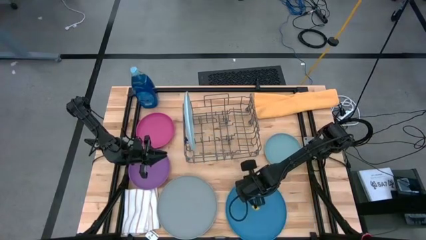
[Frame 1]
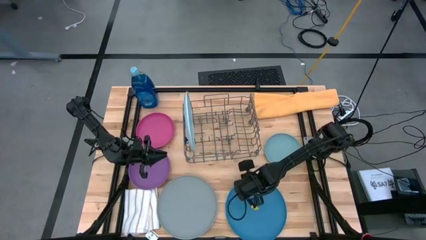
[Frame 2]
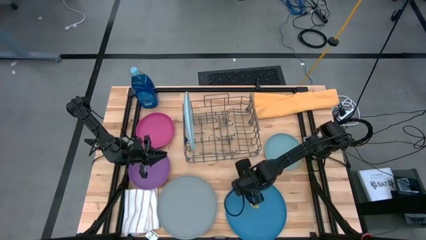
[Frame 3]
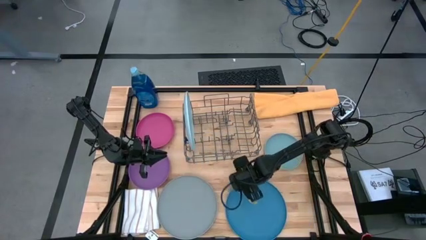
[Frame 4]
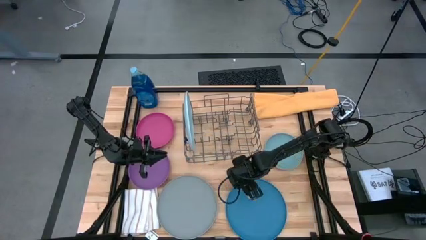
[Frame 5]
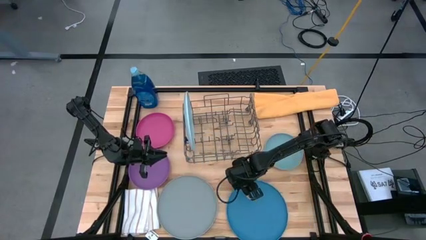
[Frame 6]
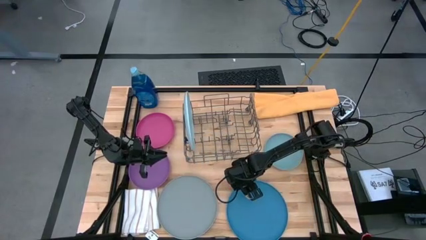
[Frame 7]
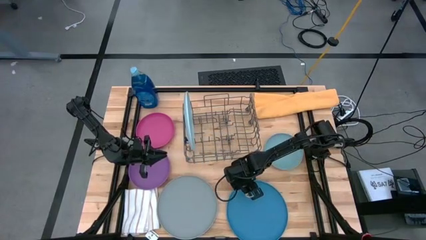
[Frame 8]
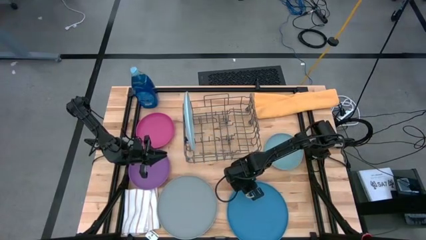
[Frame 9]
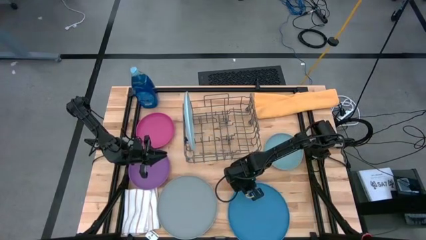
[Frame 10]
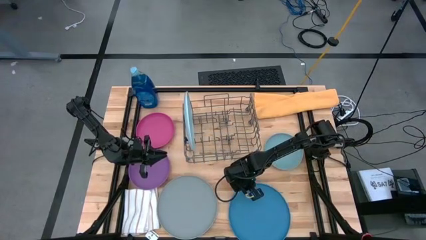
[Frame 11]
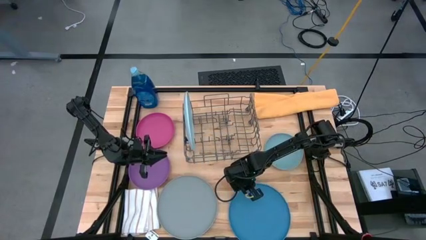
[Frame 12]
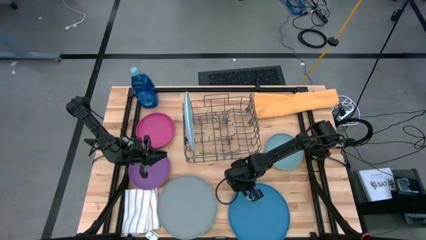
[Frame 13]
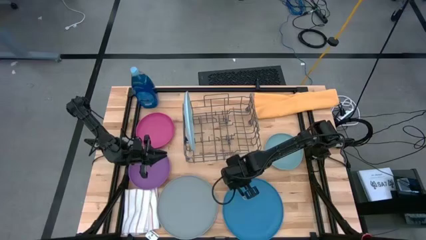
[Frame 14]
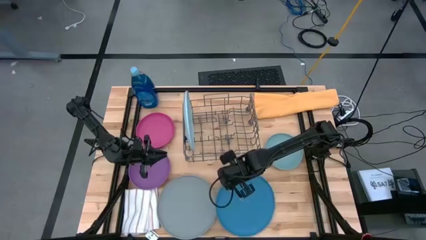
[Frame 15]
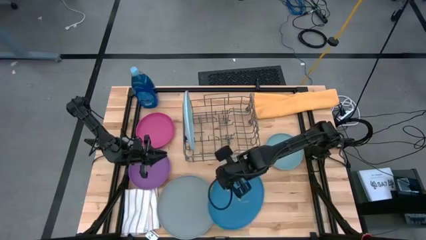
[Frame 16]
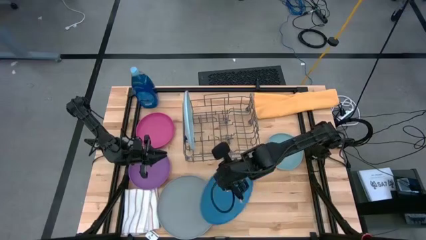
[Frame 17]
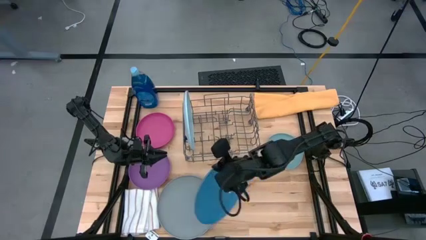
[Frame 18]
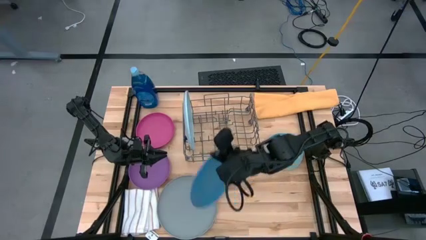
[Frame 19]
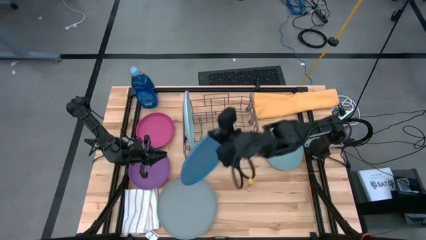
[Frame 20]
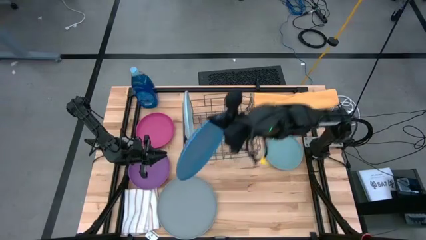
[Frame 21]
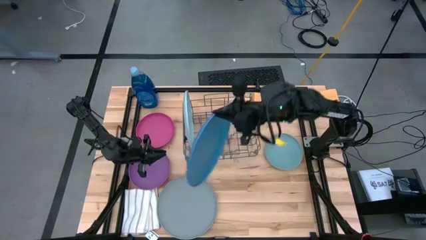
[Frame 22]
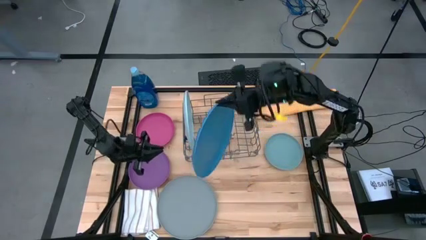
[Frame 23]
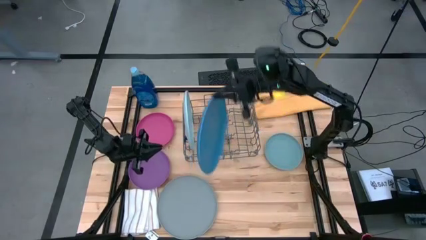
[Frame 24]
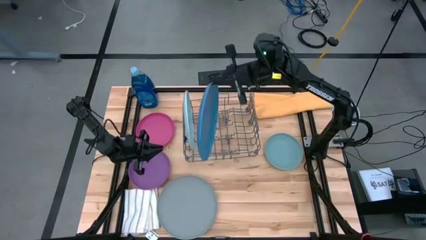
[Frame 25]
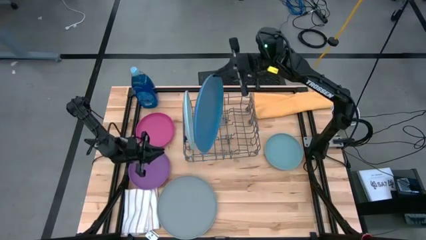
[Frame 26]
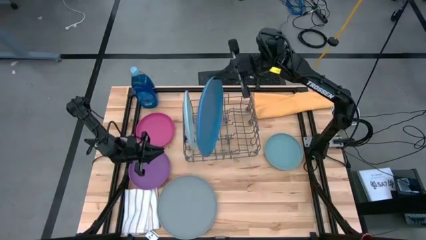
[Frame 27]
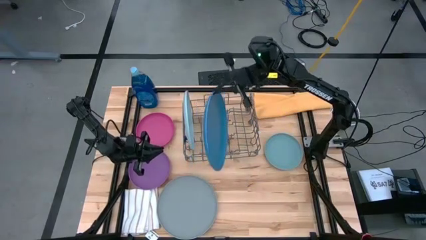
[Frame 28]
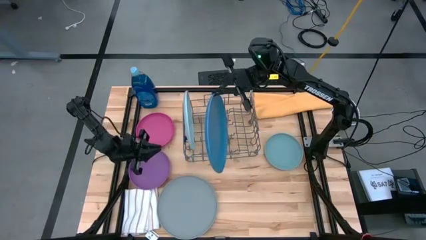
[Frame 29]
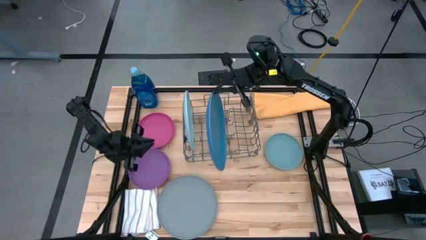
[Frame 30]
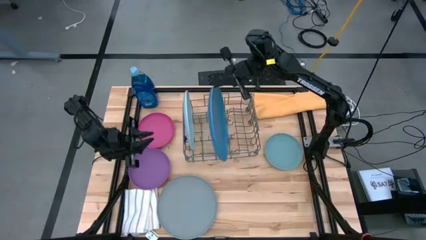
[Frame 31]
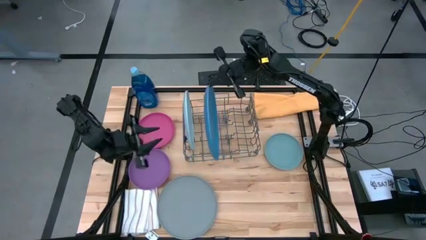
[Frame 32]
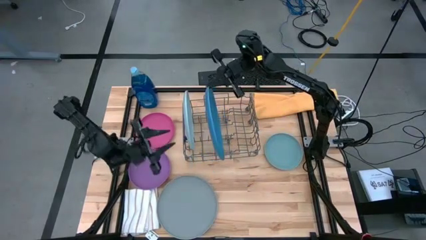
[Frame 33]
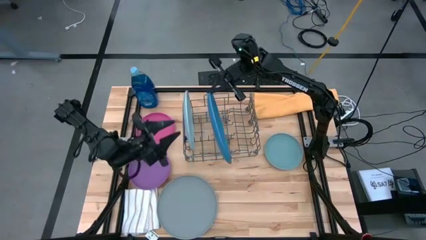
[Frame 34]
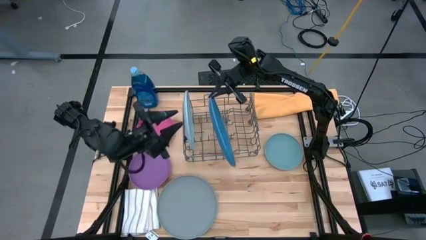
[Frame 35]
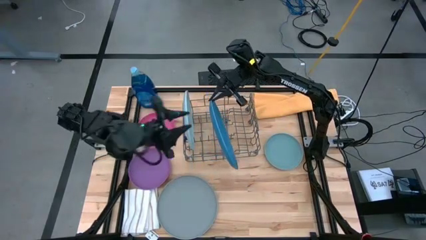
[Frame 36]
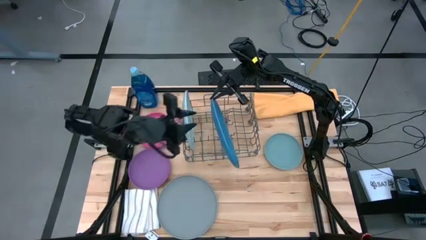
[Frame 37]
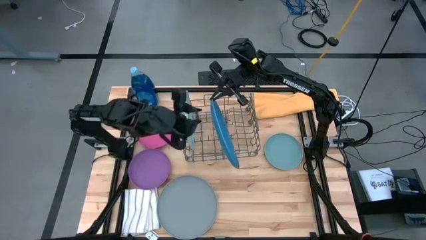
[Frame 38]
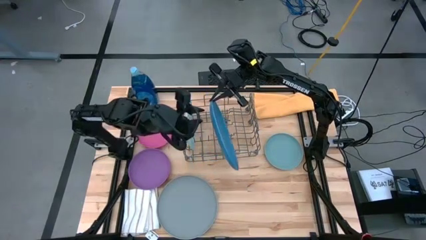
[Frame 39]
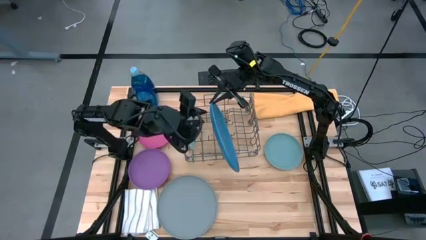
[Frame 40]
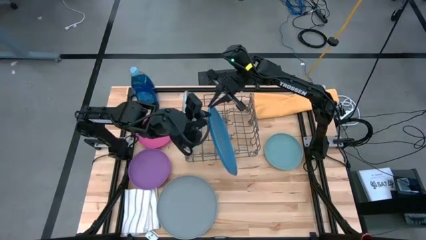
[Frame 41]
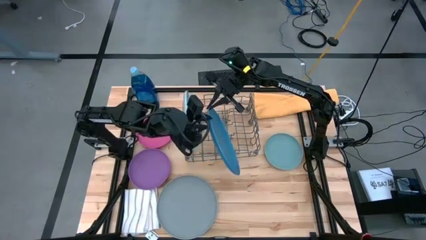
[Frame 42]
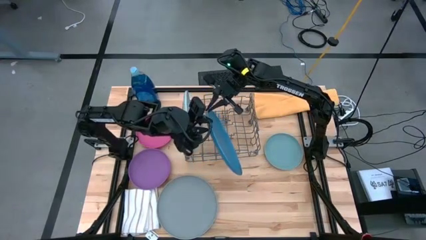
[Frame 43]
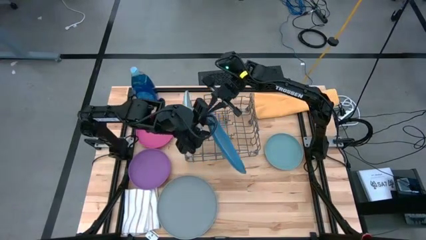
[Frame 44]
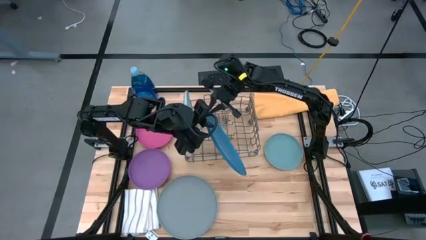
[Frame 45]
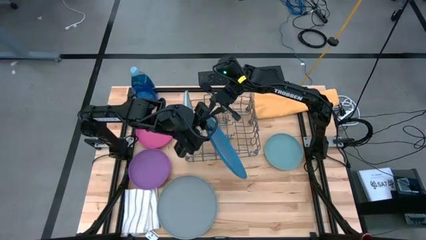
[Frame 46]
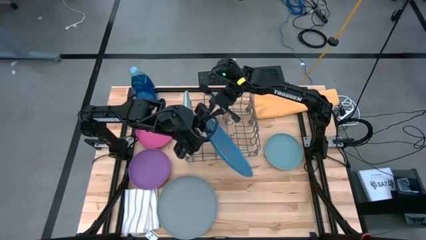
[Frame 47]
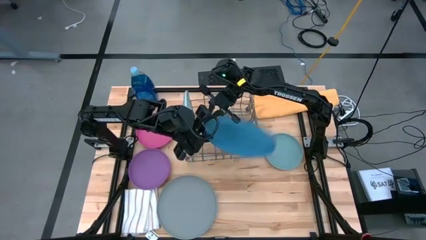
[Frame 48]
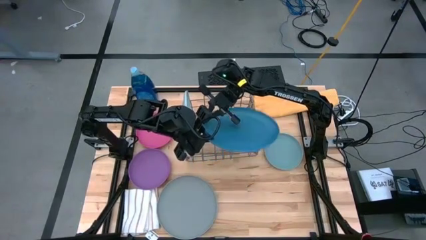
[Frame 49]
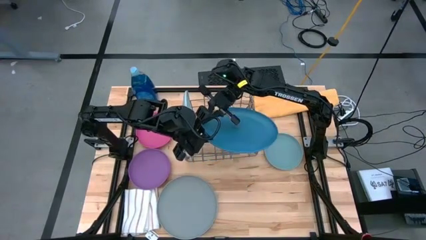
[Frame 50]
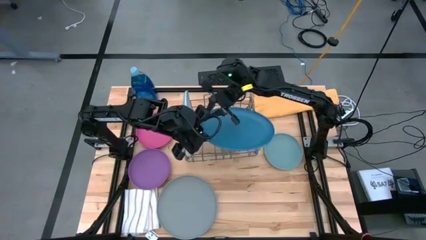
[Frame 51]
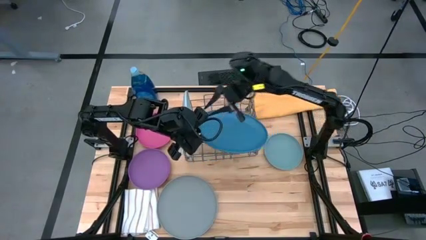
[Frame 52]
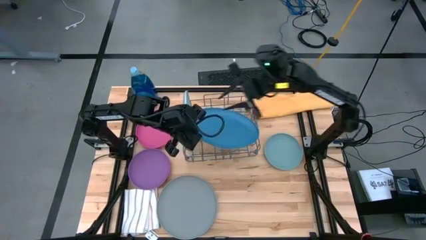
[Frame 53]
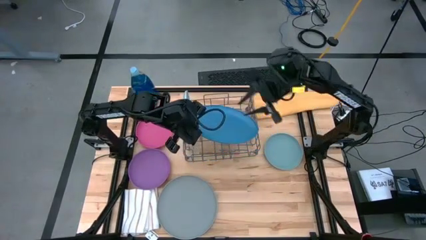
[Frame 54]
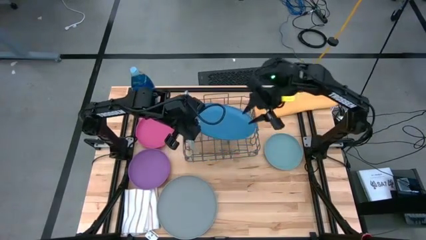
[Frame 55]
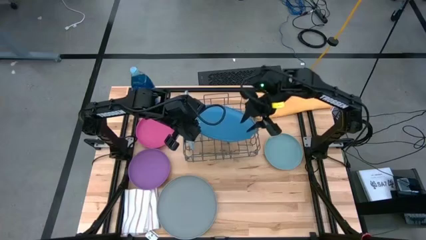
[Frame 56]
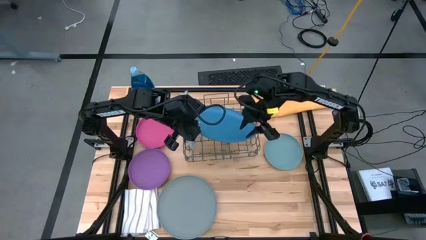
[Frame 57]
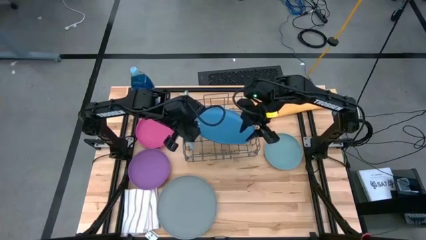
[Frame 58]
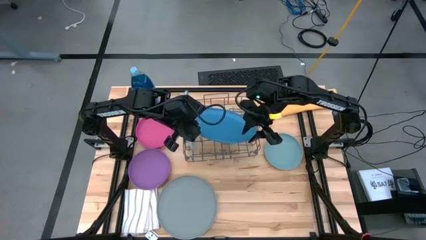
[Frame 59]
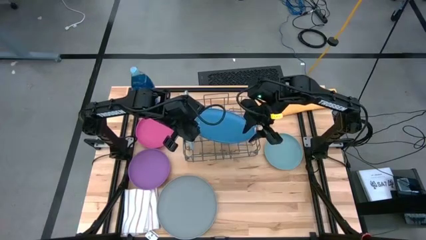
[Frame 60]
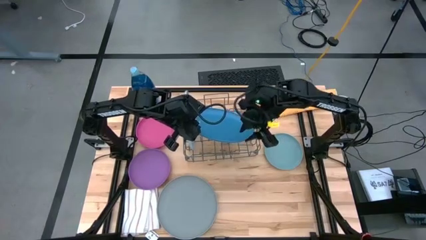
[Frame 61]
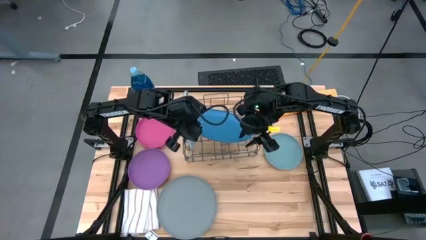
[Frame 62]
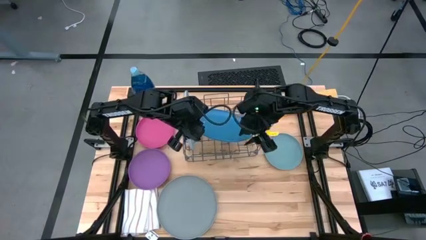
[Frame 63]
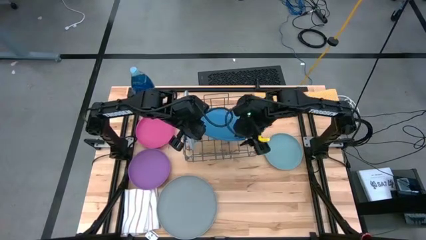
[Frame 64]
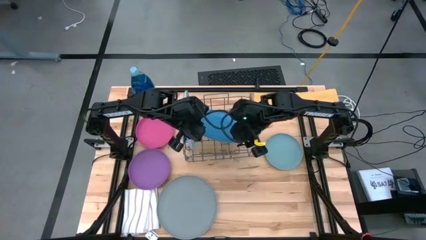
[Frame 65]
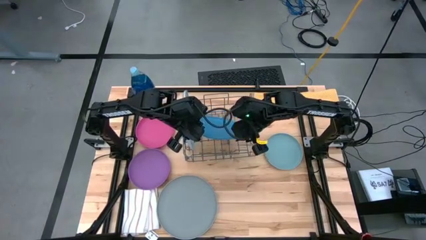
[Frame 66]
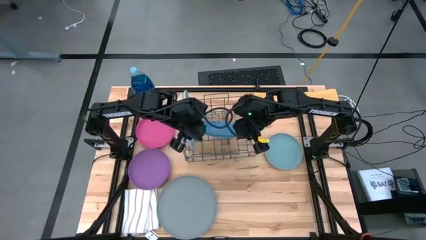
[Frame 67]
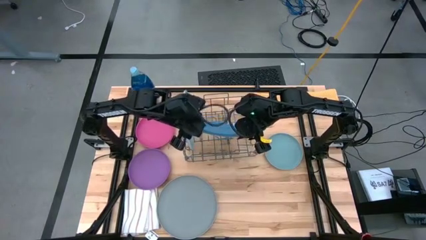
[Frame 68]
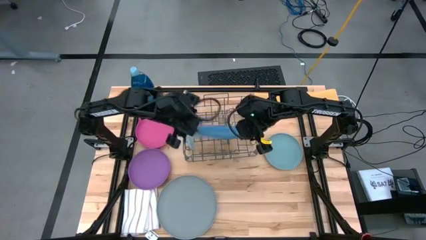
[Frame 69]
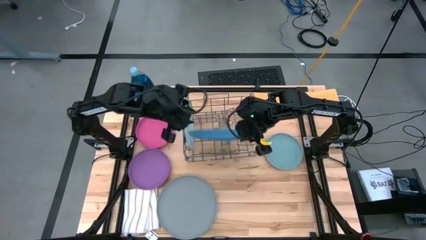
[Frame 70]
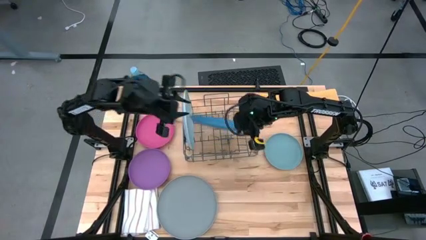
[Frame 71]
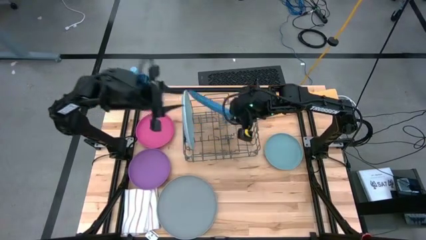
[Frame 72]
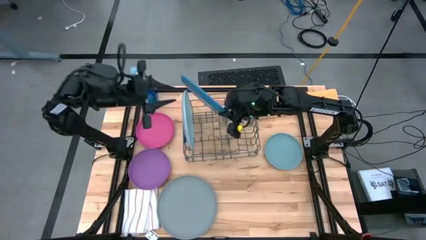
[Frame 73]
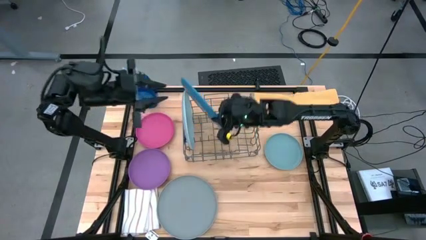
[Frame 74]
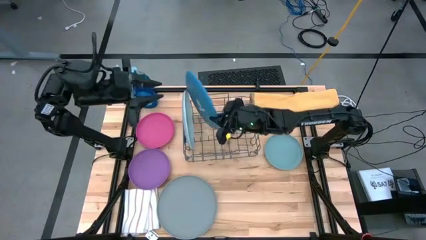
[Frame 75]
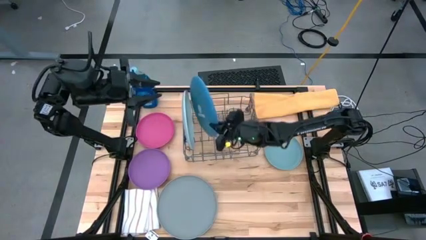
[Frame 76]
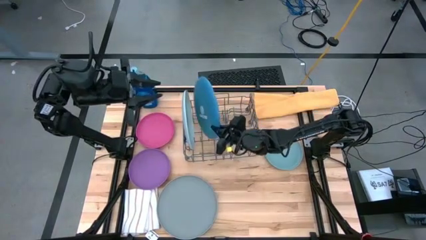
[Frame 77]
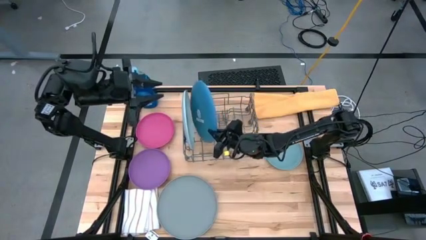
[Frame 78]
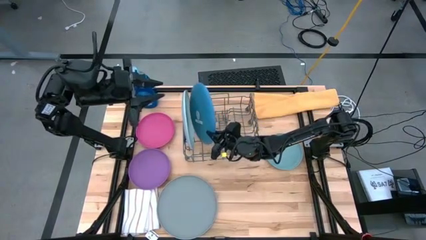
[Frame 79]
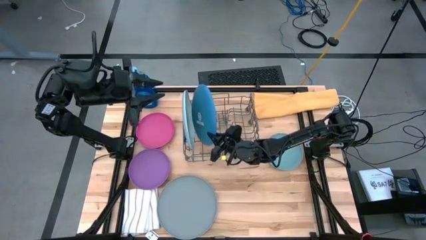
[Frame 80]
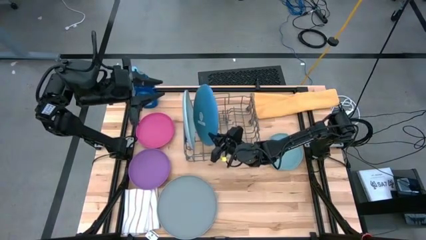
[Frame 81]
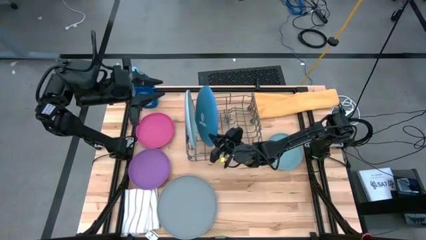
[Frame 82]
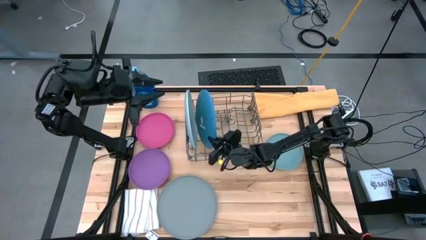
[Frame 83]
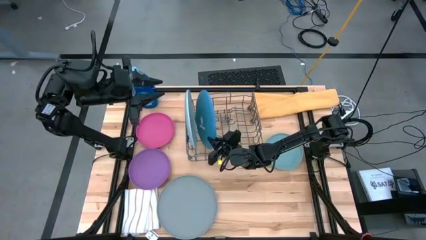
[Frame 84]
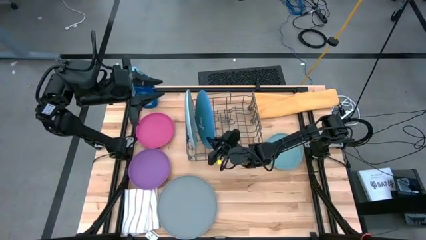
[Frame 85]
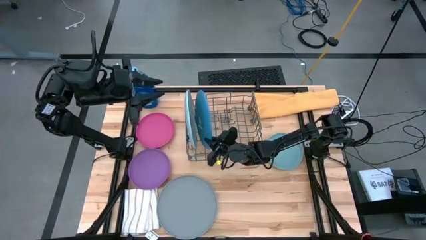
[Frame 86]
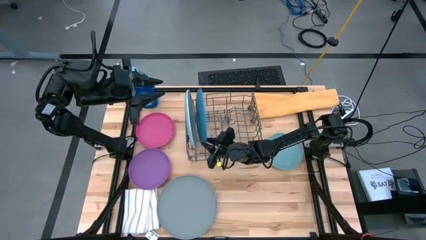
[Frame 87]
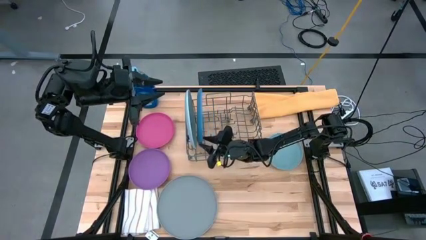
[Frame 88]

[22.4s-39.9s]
Task: Sort dishes
Put the blue plate into the dish rack
